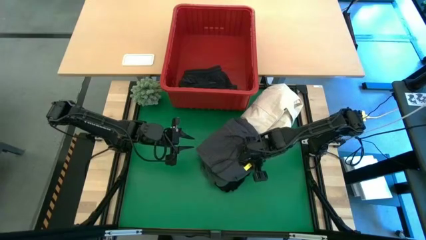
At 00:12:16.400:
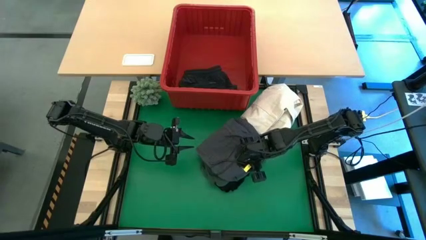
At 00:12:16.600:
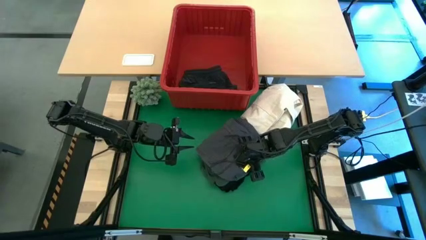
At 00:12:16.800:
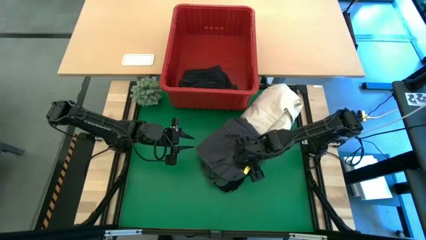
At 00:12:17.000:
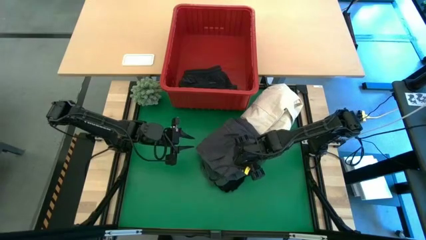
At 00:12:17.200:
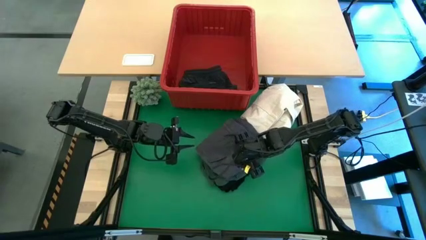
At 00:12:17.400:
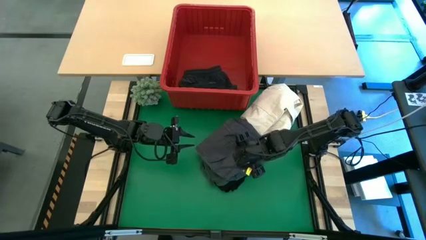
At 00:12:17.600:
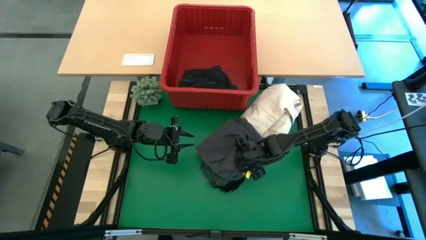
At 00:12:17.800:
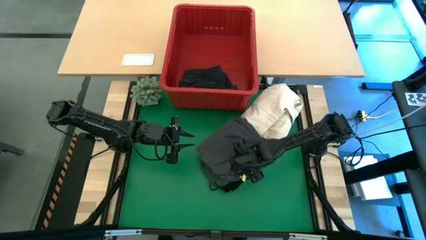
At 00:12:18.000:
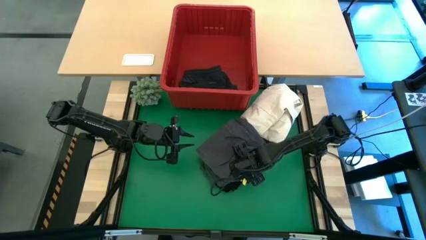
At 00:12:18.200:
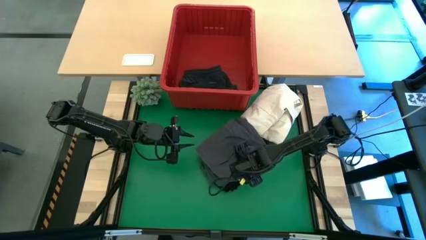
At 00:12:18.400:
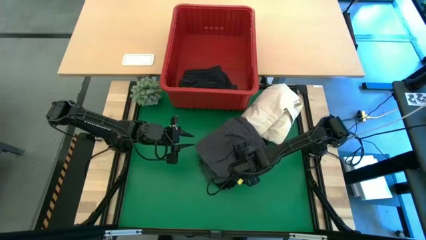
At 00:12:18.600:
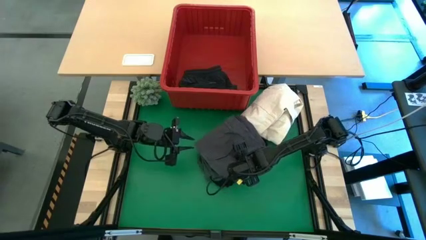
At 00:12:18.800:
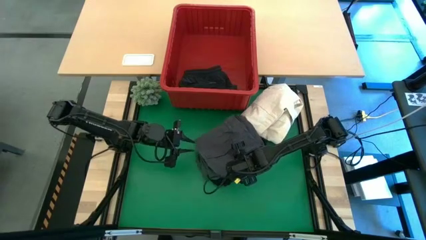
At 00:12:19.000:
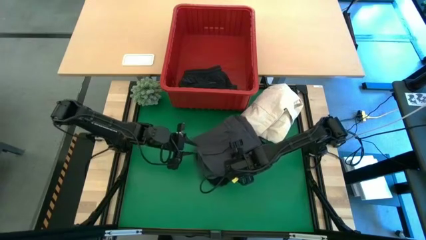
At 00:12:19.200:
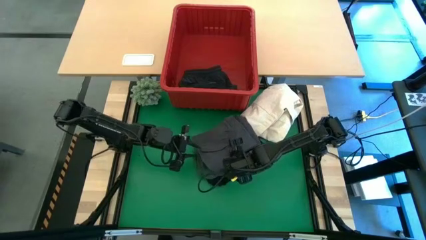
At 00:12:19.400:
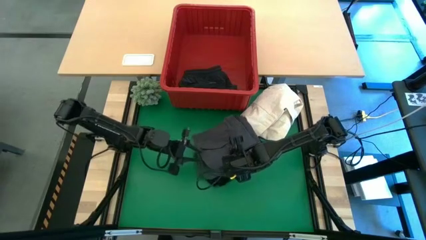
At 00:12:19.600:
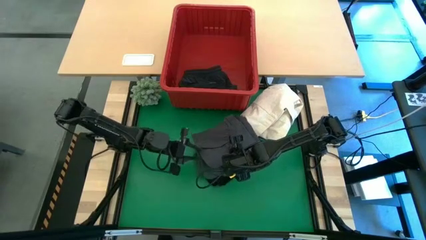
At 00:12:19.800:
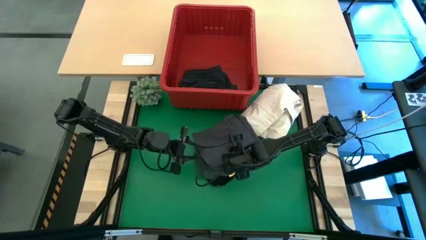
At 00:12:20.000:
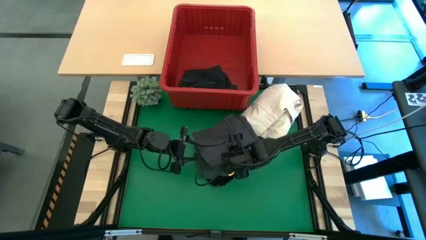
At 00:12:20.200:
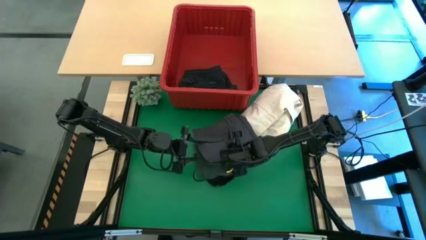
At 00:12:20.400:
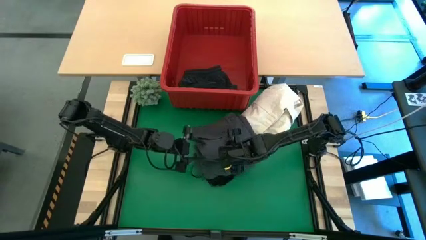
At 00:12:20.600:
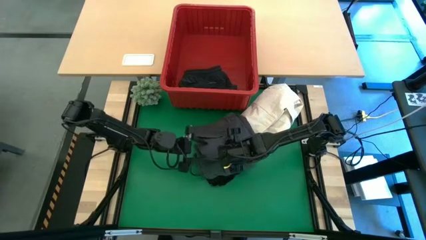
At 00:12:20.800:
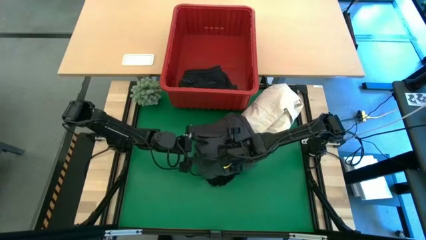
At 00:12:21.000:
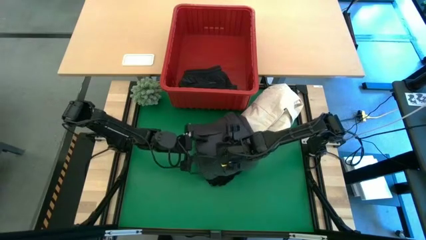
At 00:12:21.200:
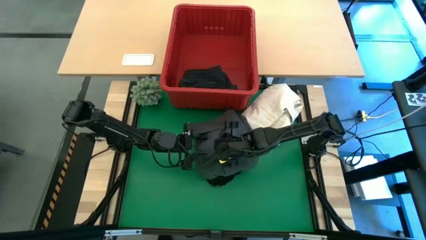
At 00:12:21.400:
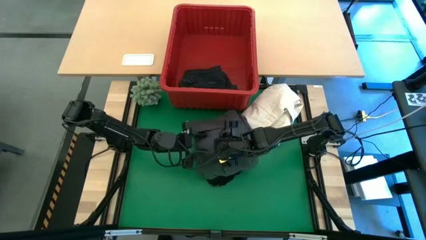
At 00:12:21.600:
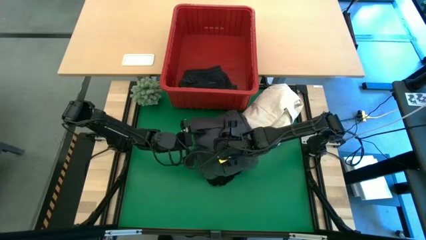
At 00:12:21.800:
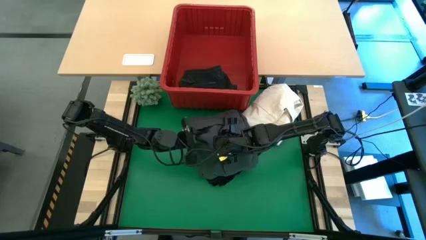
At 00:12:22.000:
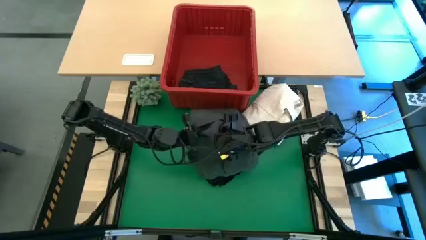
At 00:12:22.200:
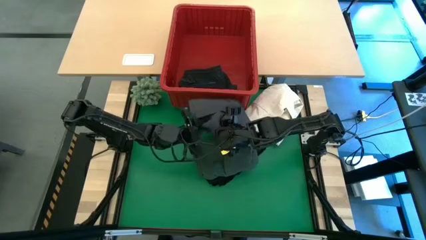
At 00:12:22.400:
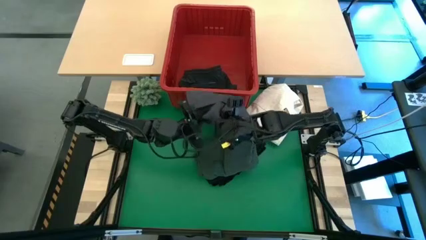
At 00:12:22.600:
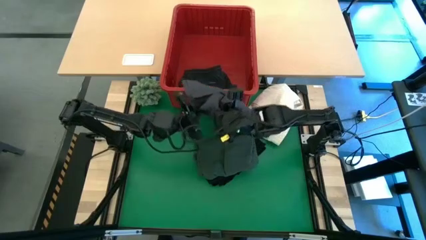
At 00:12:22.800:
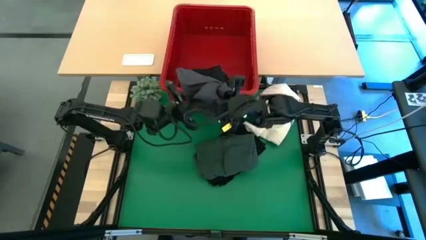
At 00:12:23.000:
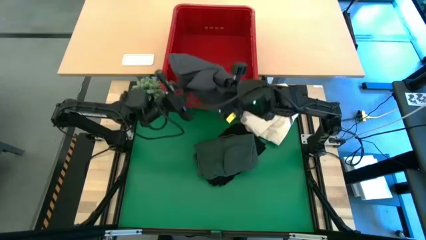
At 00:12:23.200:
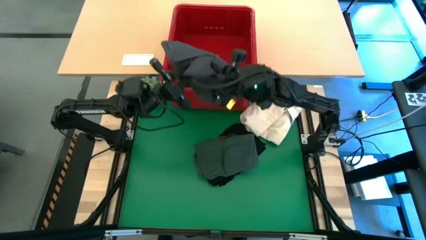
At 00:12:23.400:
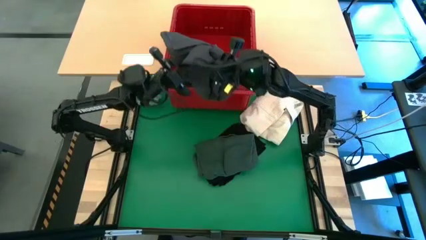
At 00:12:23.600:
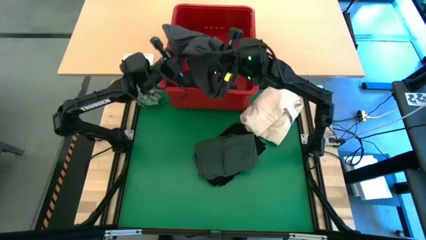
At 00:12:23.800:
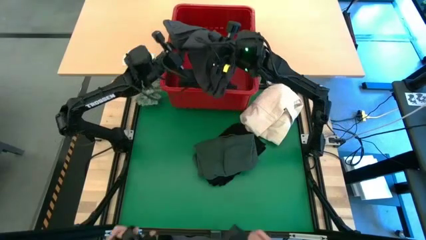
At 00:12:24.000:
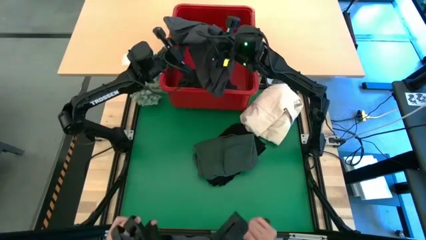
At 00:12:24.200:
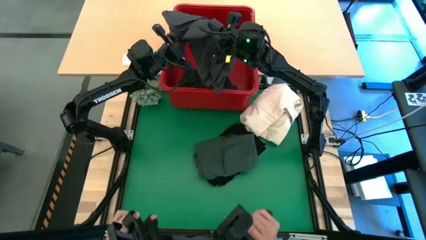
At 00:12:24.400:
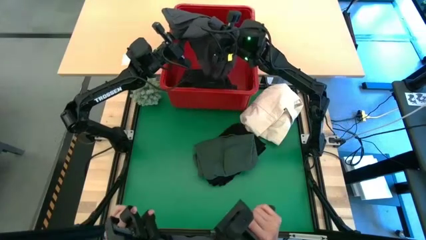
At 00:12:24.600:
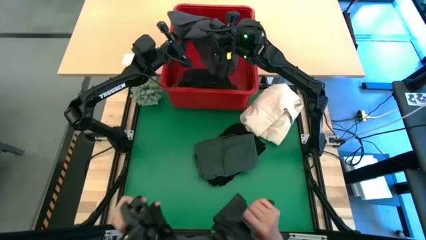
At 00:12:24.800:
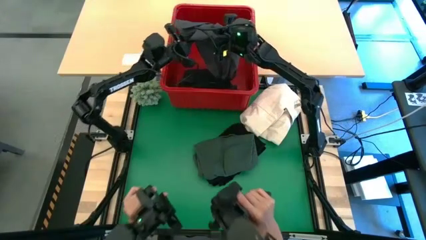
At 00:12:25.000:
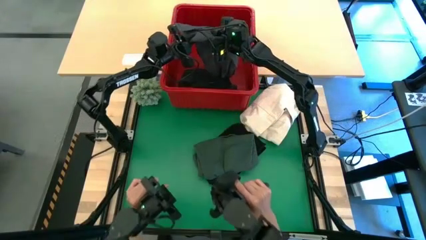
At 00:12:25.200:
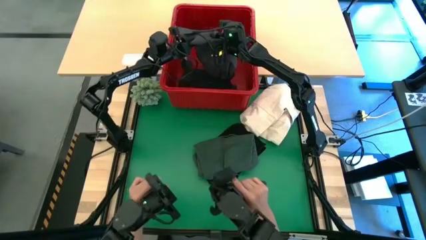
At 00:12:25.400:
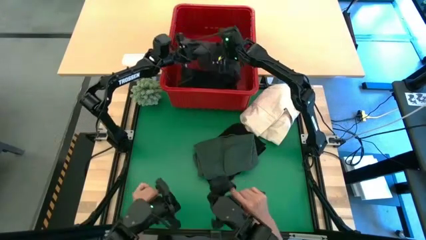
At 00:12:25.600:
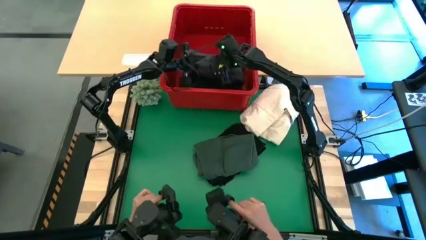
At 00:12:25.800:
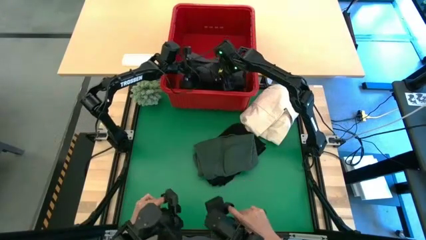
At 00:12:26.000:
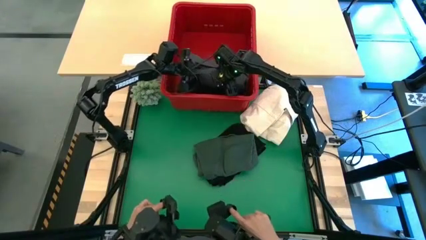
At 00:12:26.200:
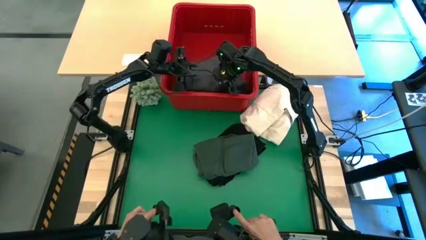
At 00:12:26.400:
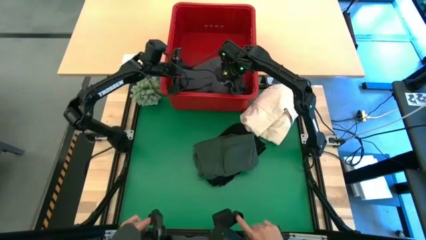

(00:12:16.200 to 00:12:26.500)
Task: Fold laundry
Put the gray folded pants into the red bin

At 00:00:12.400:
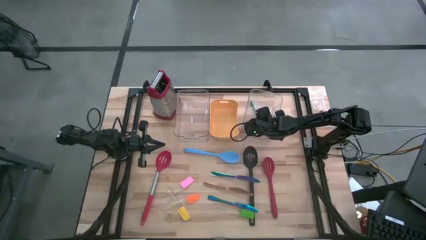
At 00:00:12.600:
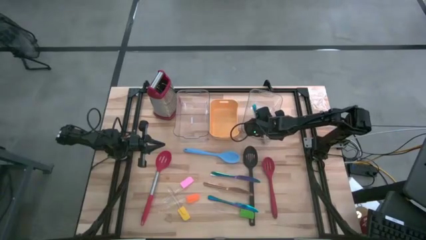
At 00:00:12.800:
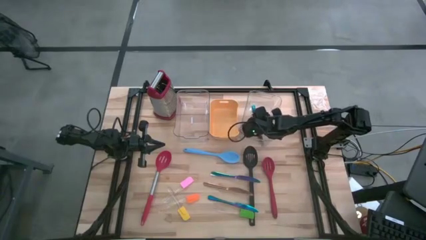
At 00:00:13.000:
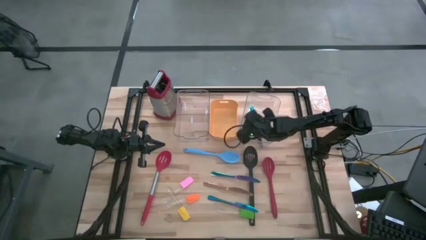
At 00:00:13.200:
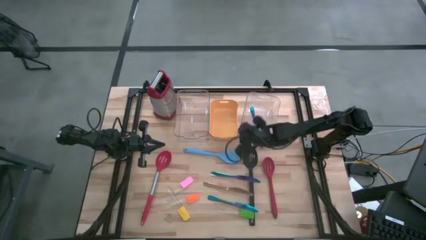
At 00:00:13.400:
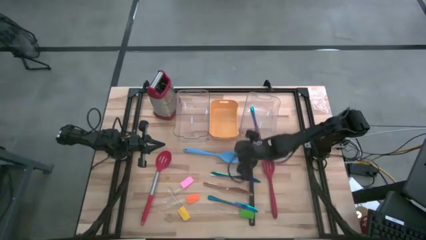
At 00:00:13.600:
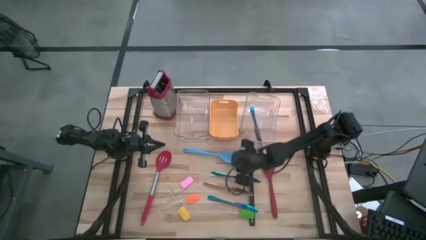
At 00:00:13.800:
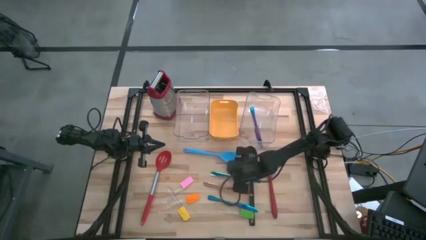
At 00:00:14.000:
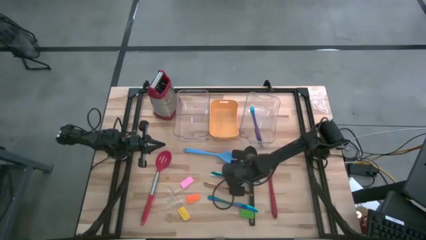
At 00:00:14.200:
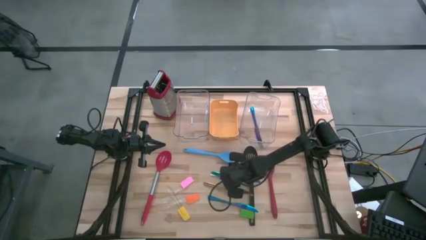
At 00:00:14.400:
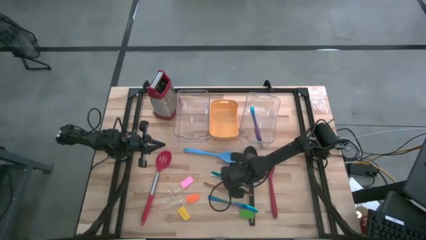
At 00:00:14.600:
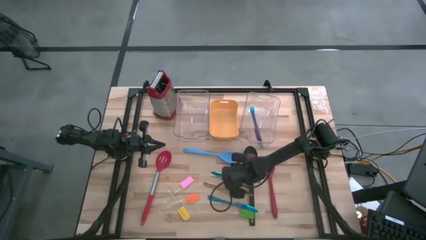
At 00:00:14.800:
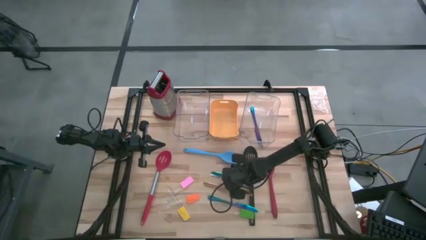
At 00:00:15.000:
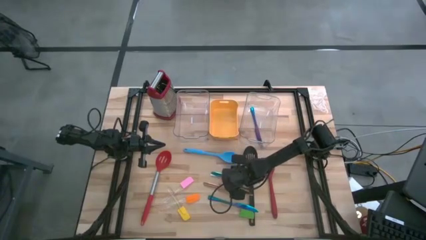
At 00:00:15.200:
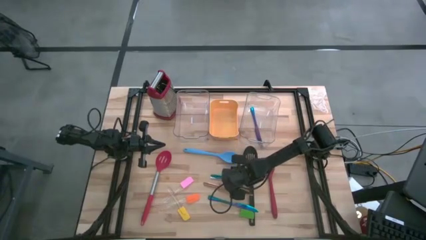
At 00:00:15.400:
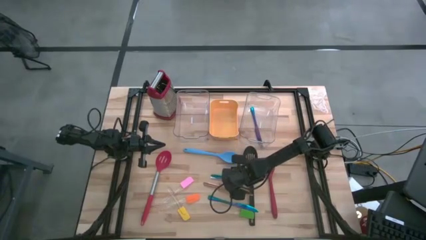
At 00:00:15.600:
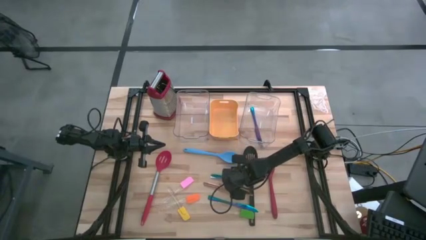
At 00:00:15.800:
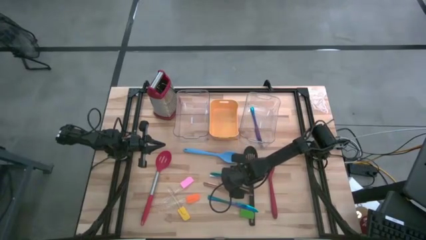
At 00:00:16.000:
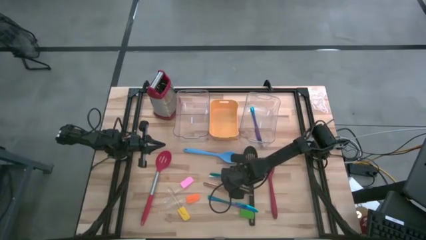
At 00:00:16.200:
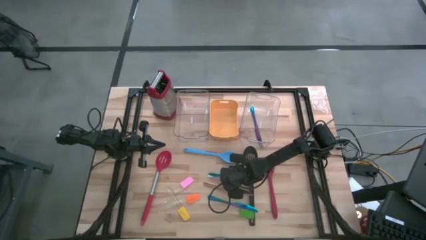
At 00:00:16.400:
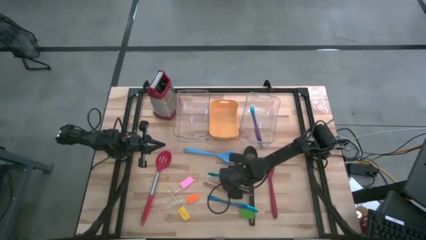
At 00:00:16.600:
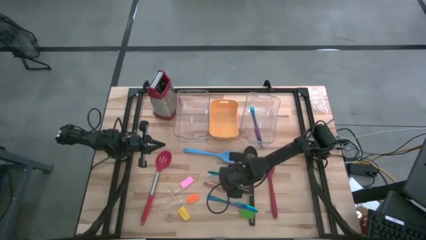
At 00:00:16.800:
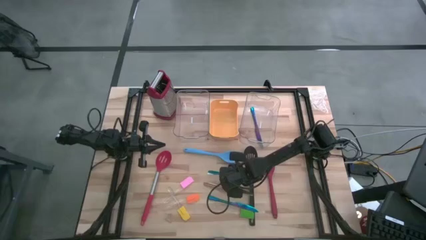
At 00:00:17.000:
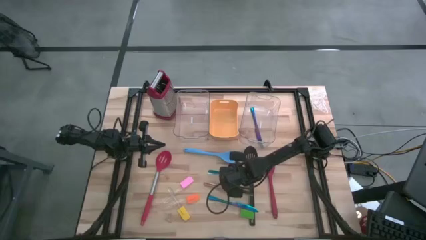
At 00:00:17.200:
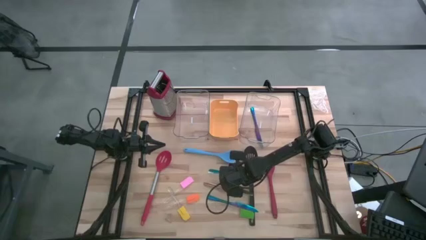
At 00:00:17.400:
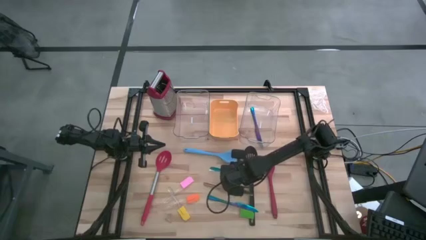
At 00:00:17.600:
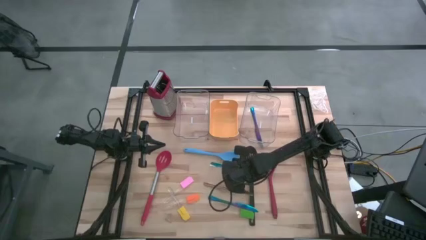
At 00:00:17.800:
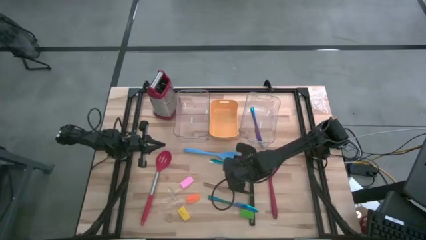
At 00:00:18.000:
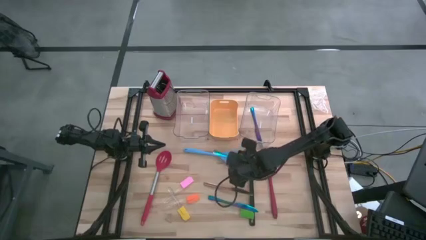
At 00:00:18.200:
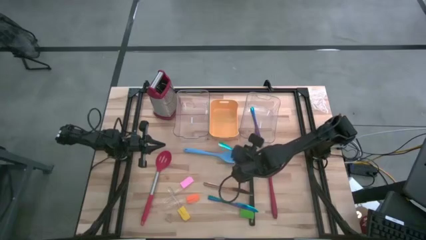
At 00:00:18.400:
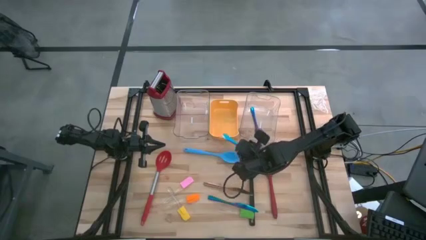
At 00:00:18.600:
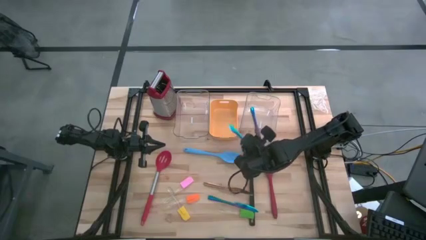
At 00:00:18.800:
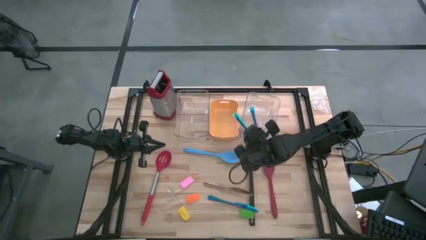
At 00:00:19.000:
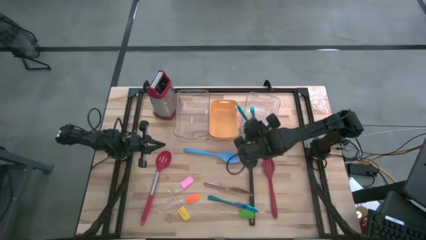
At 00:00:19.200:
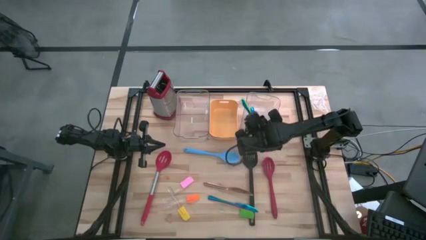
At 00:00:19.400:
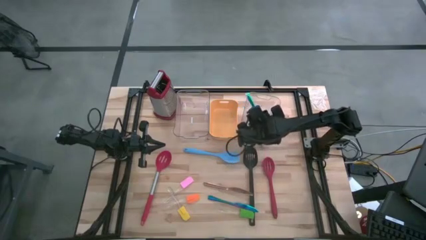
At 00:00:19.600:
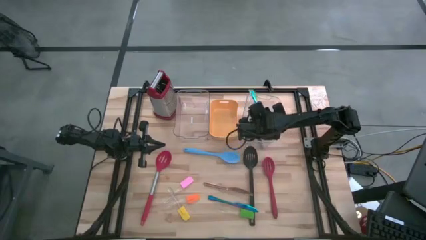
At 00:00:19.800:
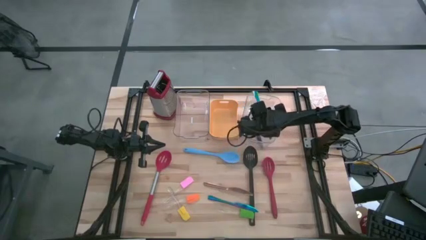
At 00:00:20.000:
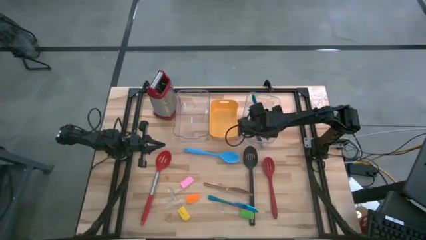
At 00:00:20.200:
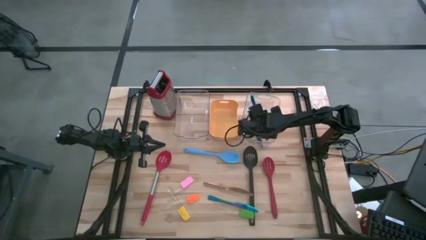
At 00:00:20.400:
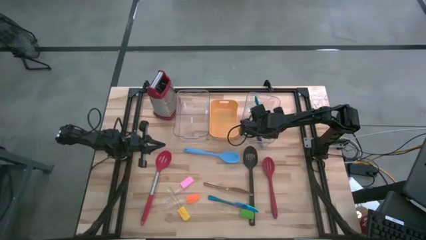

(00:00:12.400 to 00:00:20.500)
Task: Pick & Place Kitchen Items
Put the top blue knife into the right transparent bin
